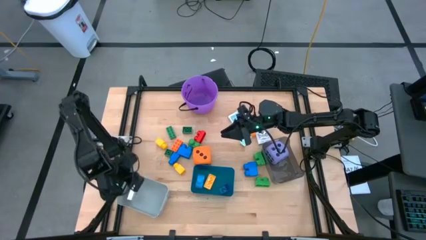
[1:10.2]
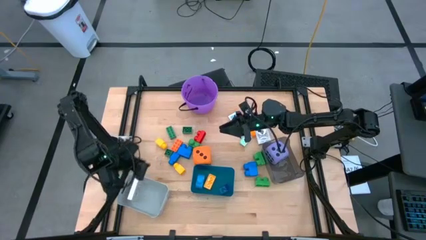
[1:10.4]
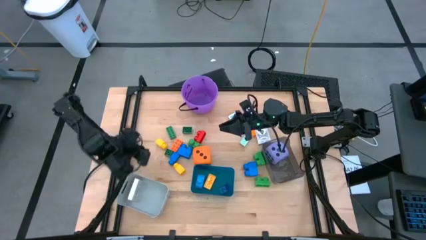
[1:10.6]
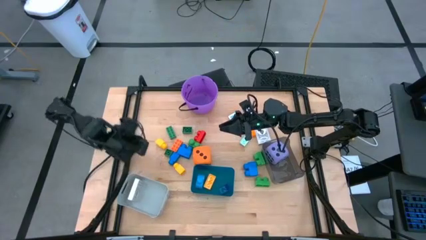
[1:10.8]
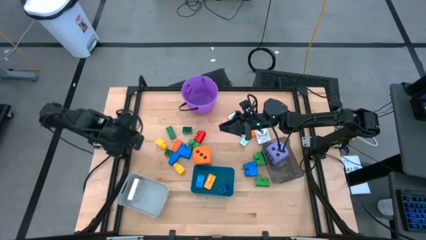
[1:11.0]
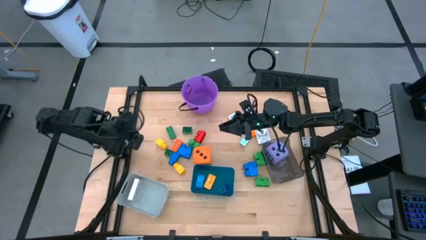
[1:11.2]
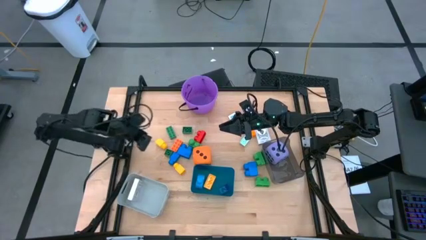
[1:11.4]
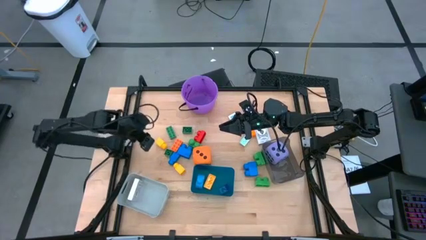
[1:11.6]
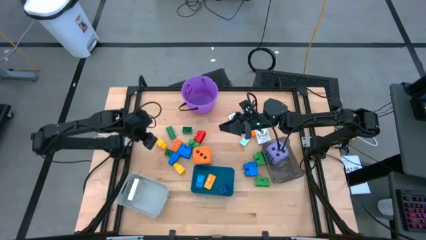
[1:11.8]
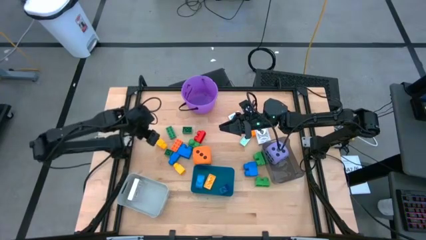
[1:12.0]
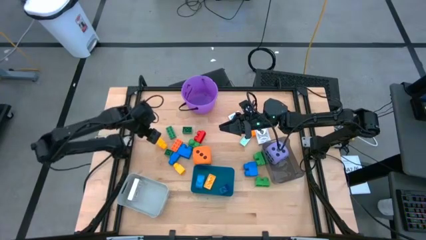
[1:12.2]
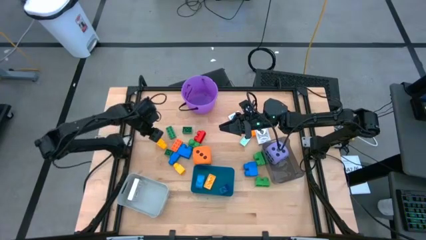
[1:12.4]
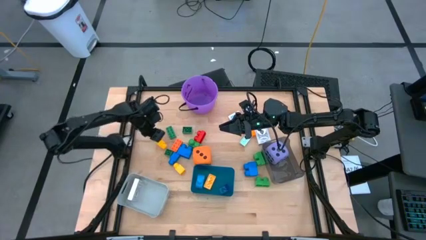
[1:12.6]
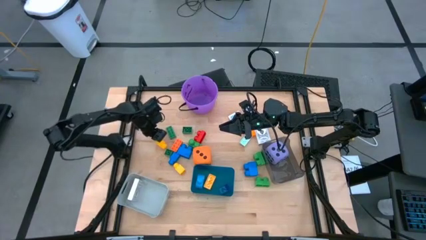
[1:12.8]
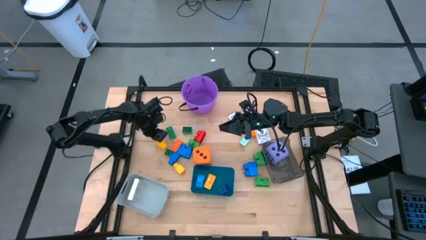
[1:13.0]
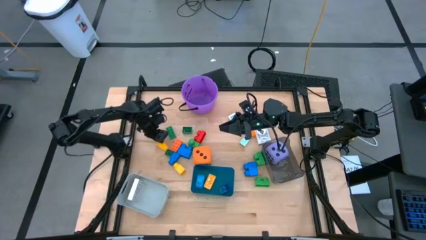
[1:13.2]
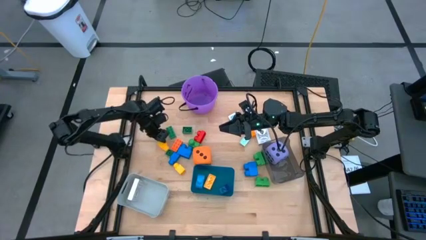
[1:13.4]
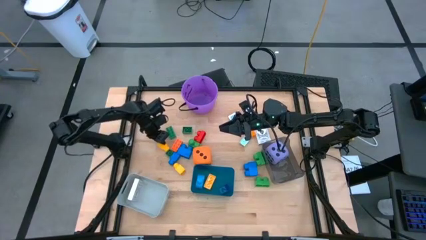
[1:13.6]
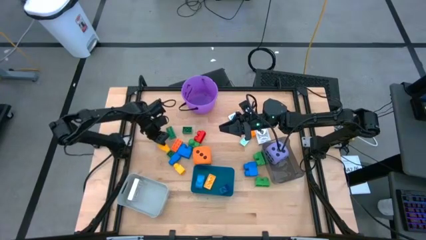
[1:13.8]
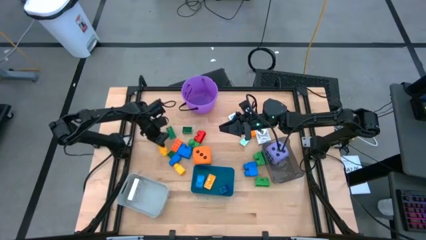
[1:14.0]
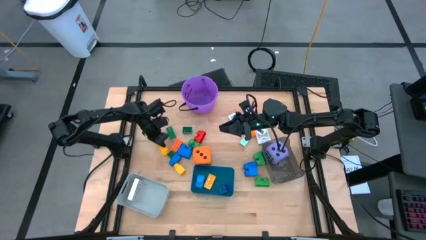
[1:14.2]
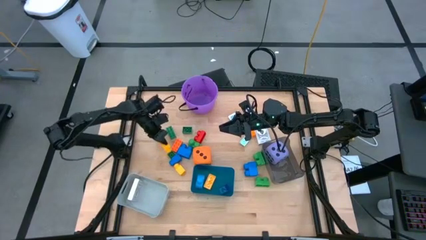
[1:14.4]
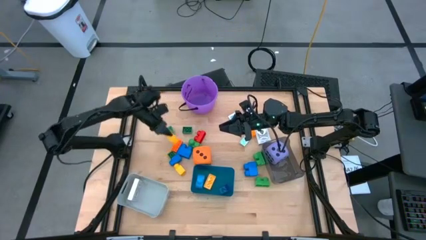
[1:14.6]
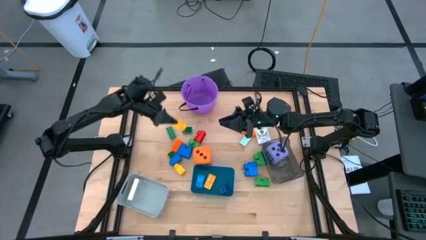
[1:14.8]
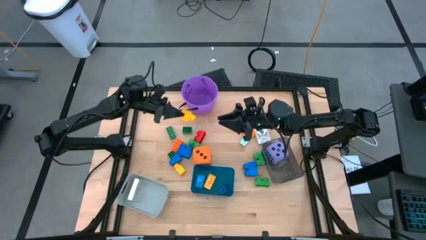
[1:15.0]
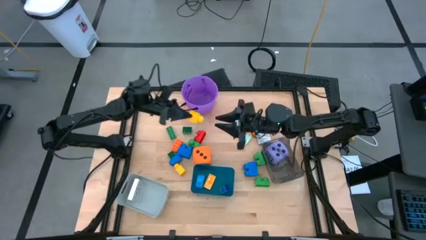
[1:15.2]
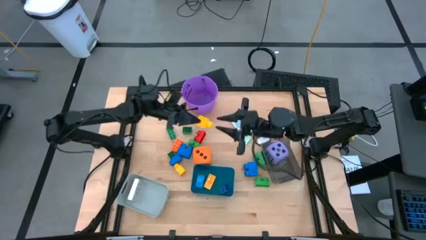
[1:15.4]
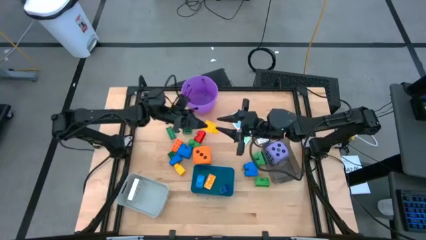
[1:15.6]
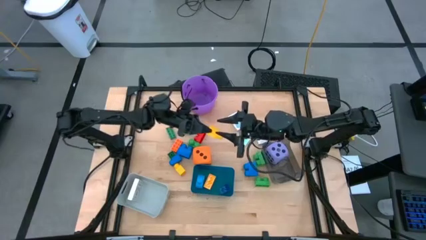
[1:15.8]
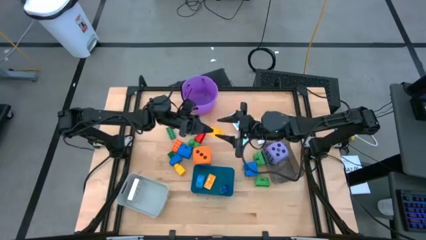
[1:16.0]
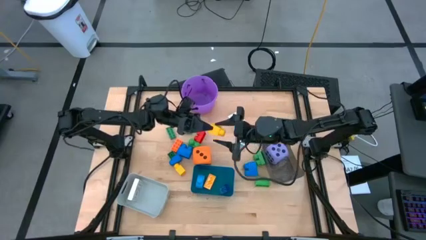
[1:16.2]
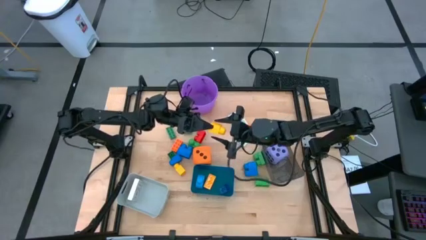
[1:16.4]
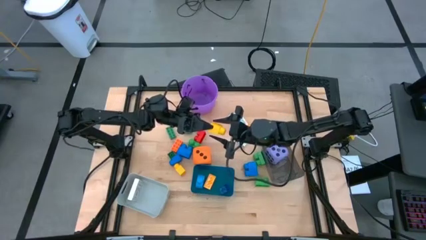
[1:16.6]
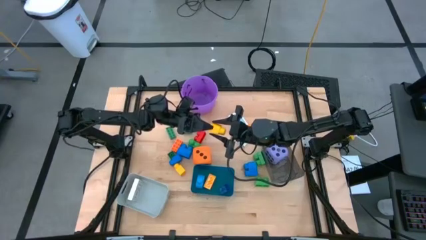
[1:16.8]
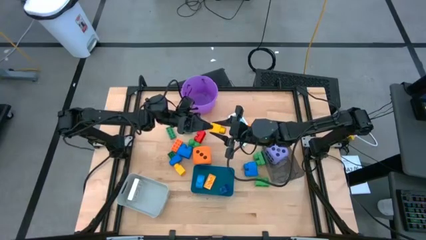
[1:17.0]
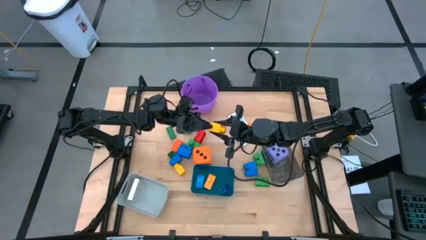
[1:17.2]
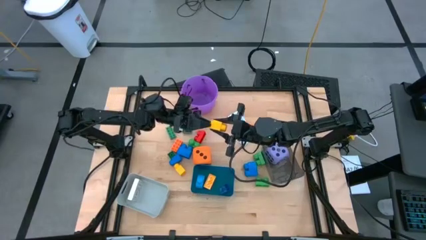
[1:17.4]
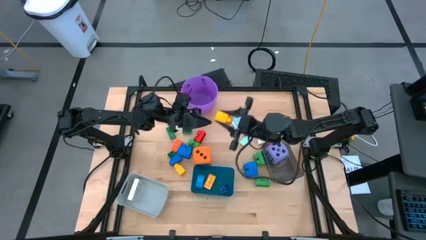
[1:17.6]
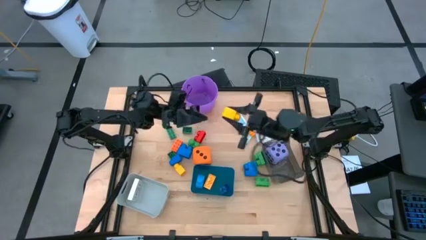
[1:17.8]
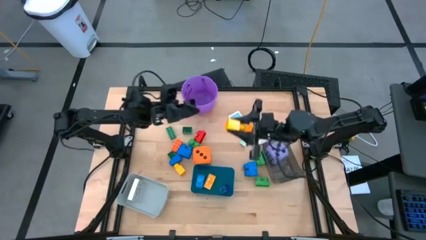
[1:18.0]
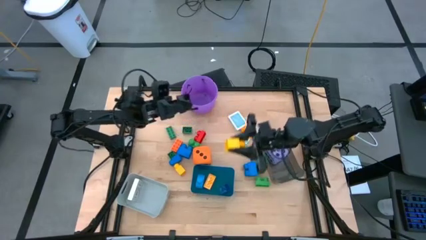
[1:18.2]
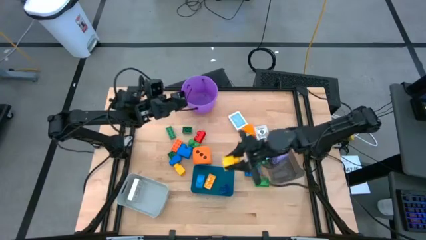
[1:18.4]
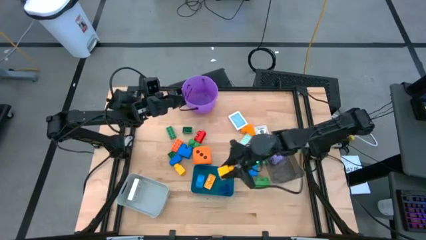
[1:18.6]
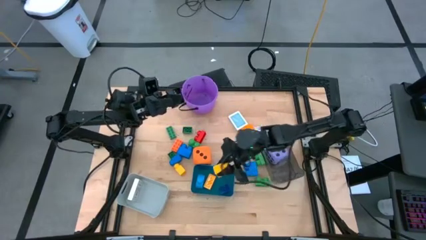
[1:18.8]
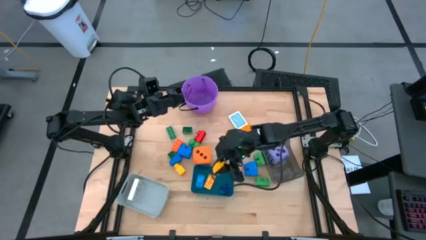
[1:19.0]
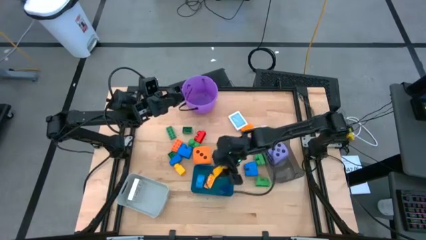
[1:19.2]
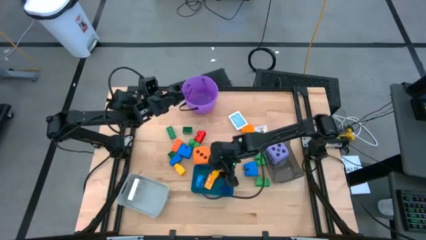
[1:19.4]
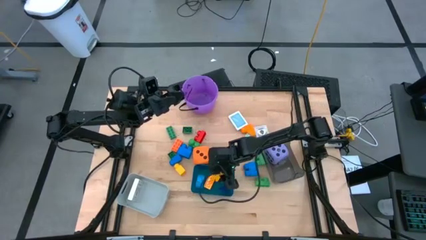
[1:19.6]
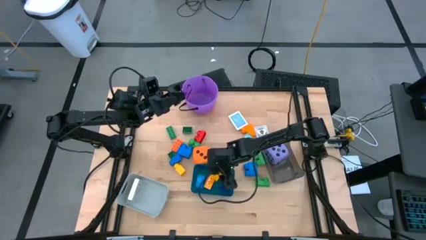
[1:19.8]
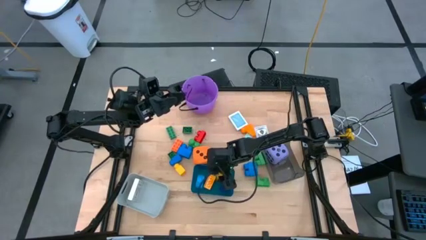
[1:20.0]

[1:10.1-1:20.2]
Task: Pick & Place Toys
Put the top yellow game piece into the blue bin

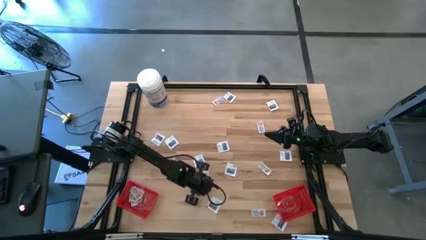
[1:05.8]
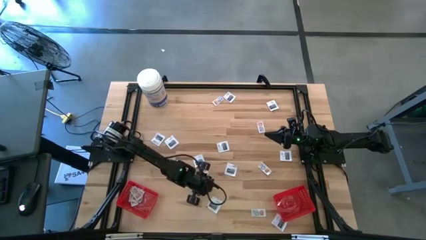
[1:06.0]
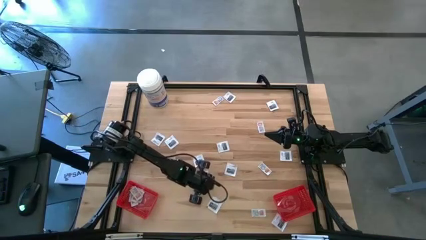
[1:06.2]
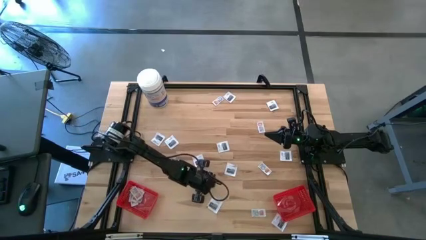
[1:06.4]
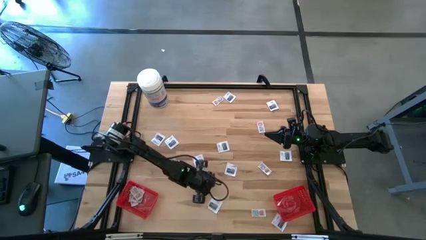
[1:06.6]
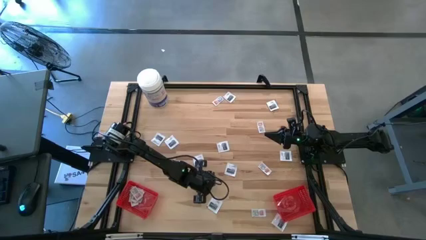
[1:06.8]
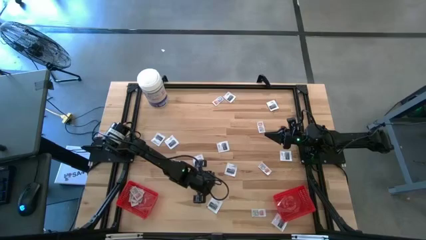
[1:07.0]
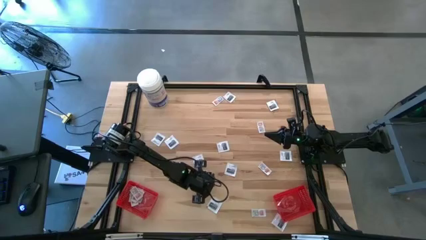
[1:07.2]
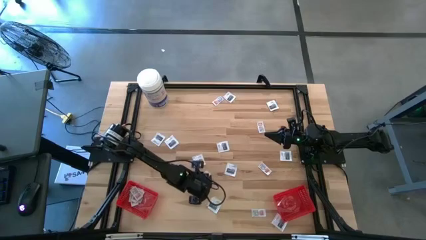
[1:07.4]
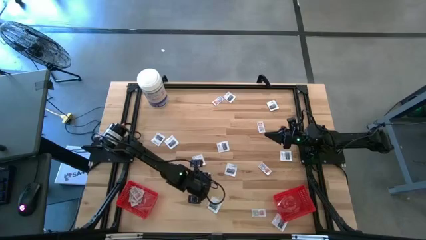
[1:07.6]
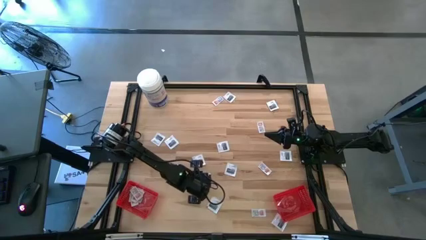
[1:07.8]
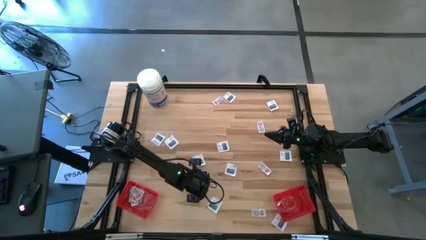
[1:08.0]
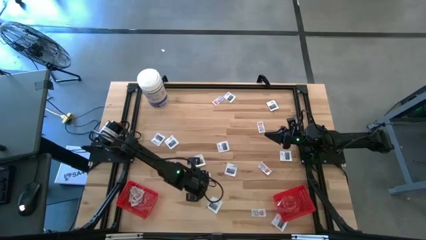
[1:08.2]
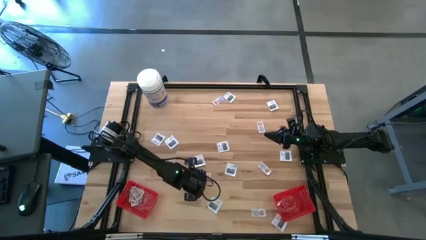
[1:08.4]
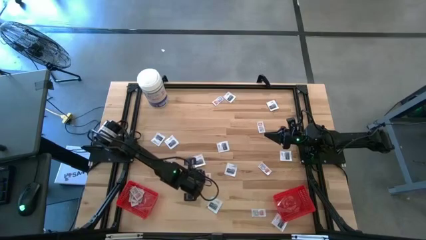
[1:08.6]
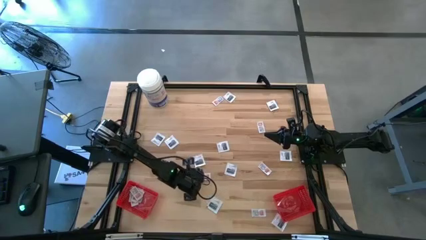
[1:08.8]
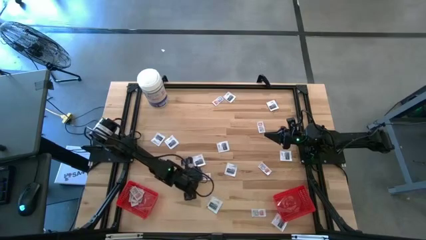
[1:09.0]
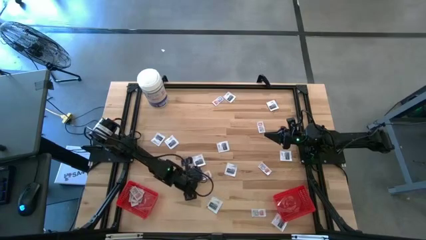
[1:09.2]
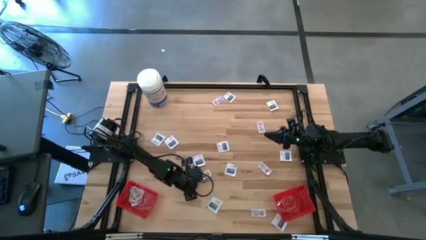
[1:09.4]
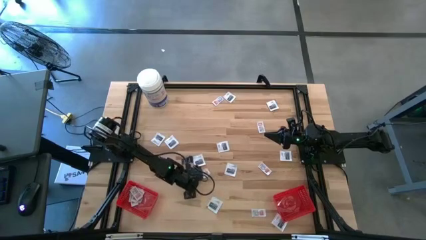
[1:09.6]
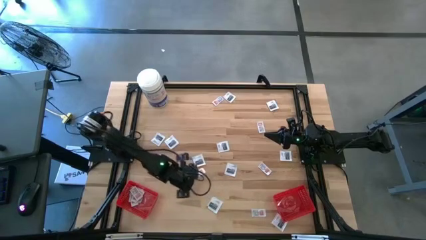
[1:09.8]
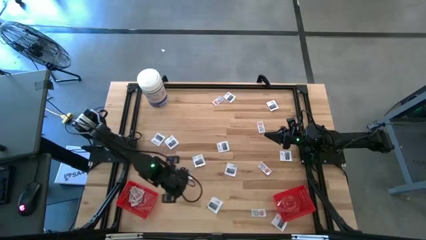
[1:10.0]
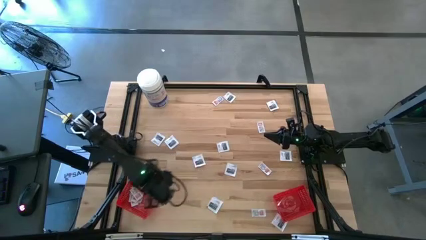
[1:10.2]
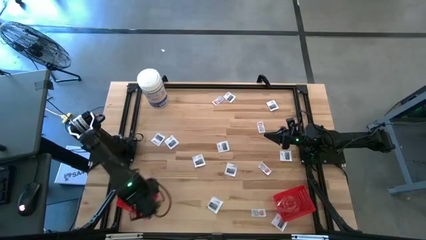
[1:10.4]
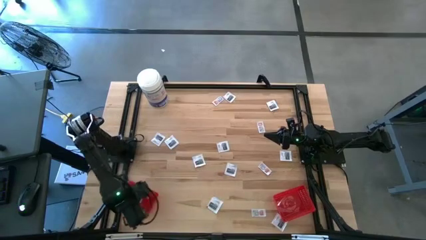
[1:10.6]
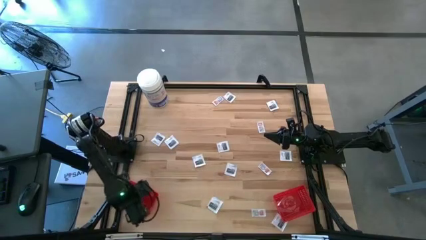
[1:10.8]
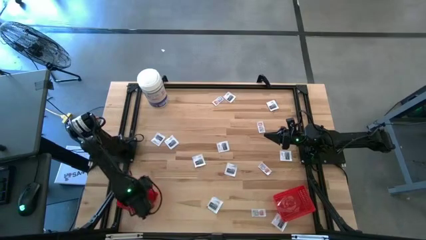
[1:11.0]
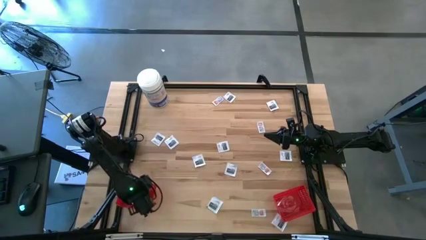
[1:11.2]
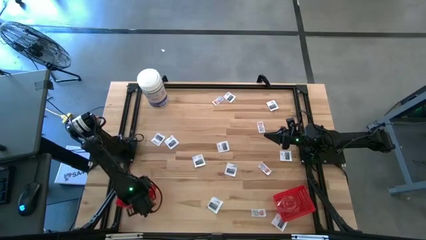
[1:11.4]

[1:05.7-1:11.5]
Task: Pick & Place First Aid Supplies
Put the ointment pack into the left red bin
